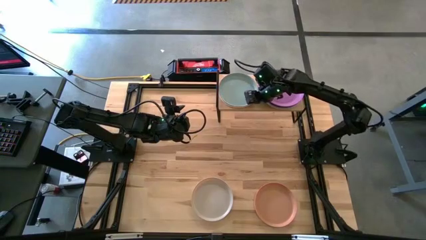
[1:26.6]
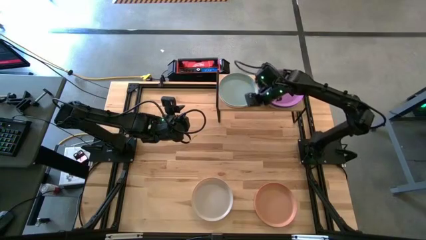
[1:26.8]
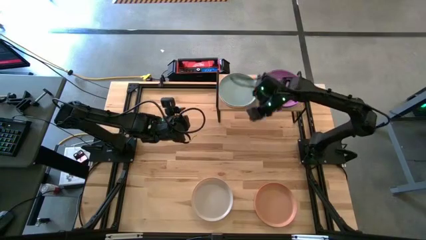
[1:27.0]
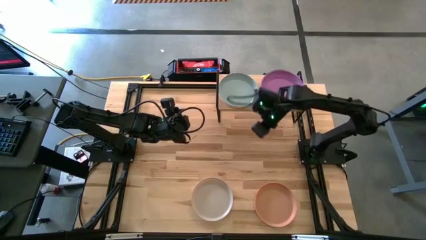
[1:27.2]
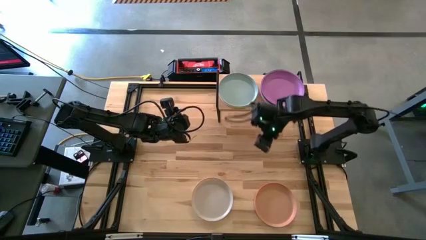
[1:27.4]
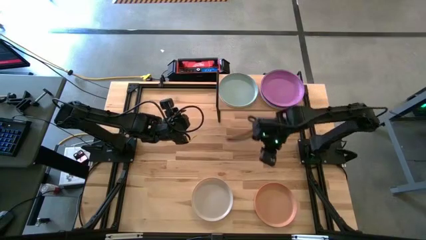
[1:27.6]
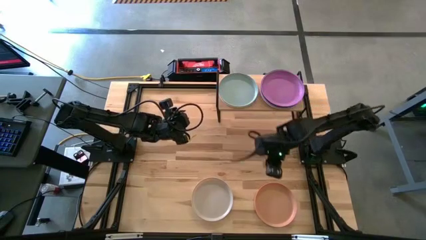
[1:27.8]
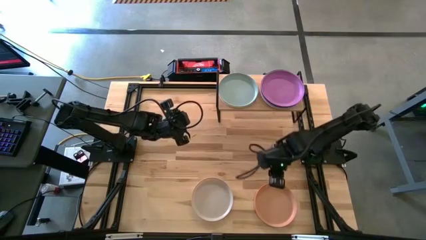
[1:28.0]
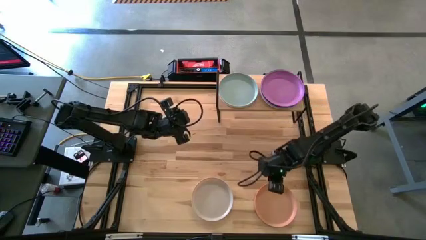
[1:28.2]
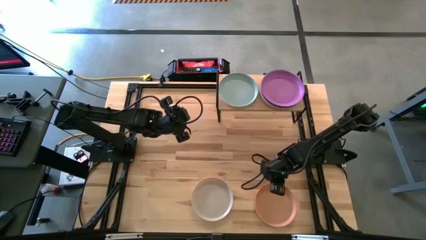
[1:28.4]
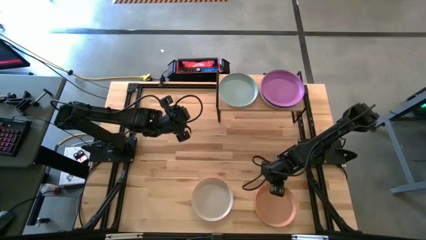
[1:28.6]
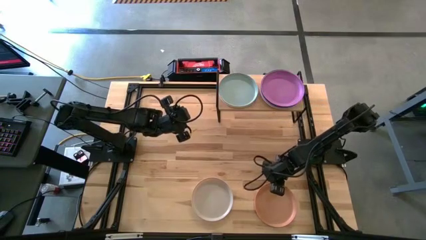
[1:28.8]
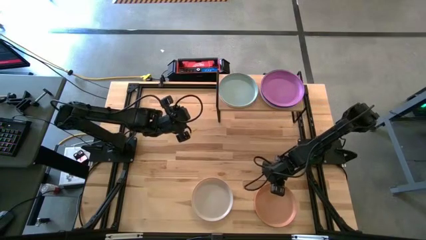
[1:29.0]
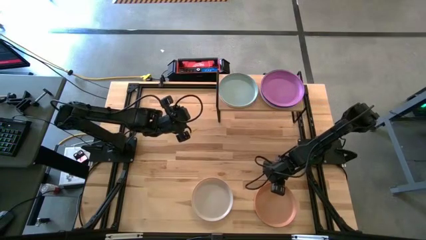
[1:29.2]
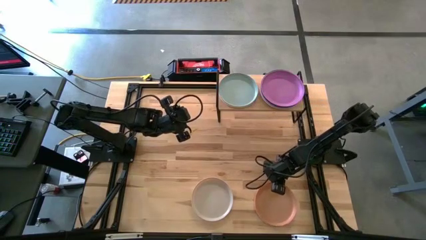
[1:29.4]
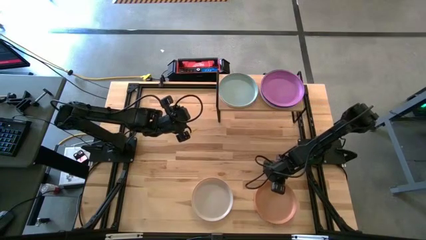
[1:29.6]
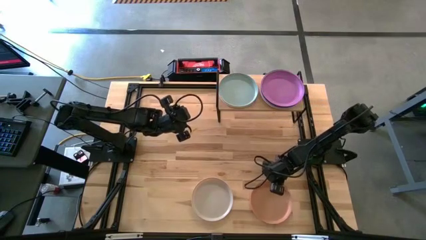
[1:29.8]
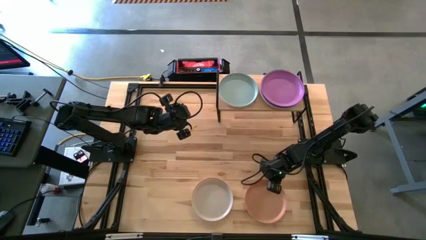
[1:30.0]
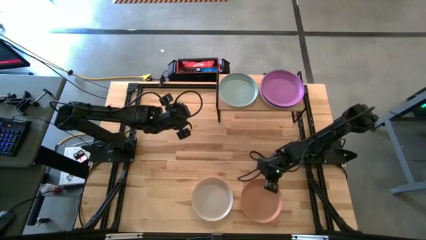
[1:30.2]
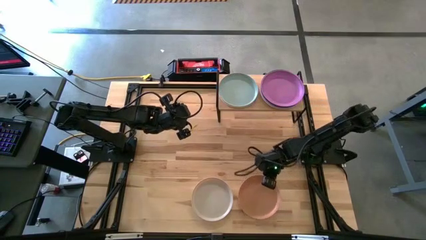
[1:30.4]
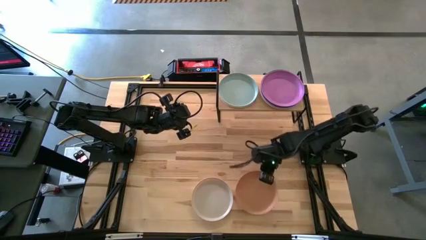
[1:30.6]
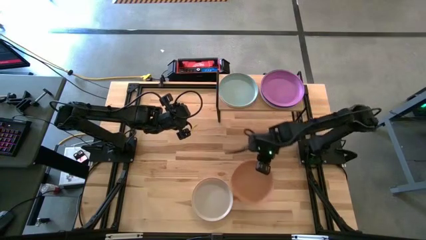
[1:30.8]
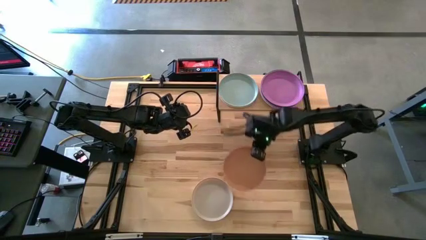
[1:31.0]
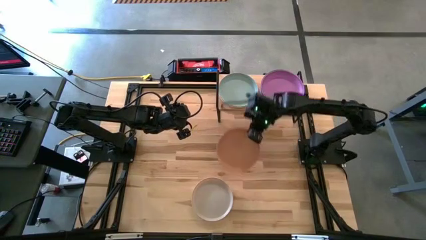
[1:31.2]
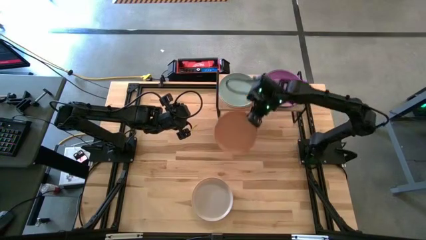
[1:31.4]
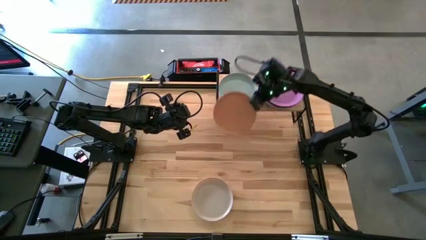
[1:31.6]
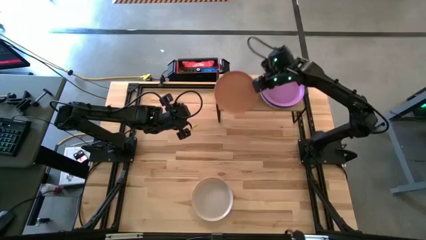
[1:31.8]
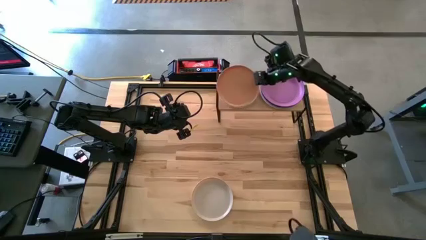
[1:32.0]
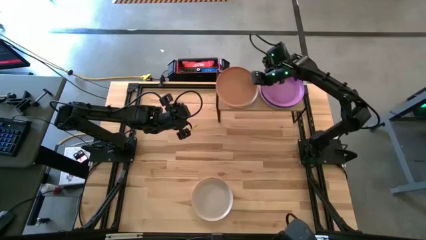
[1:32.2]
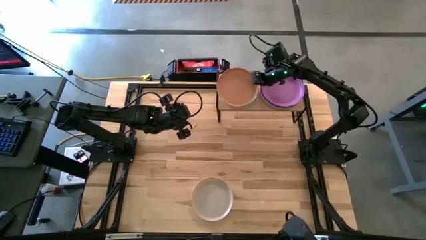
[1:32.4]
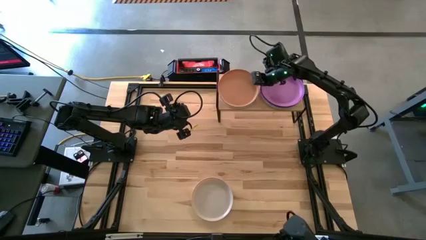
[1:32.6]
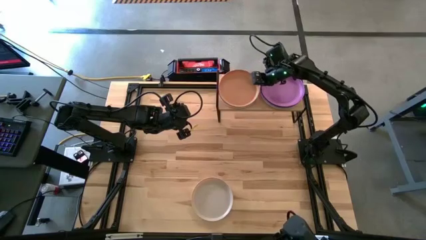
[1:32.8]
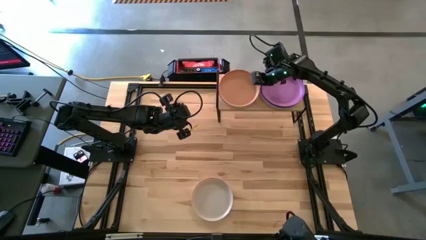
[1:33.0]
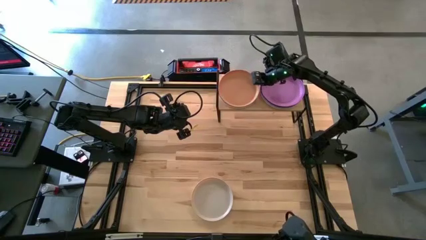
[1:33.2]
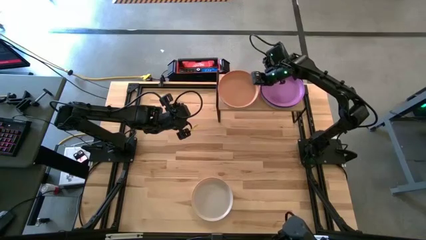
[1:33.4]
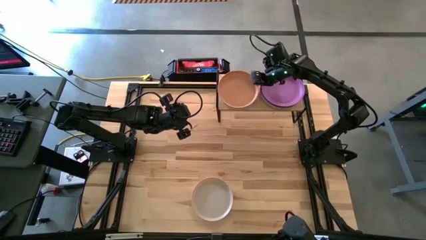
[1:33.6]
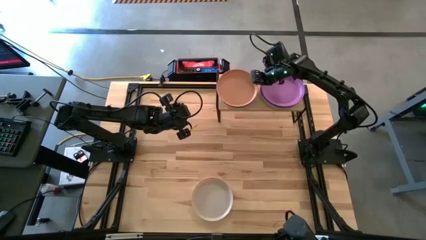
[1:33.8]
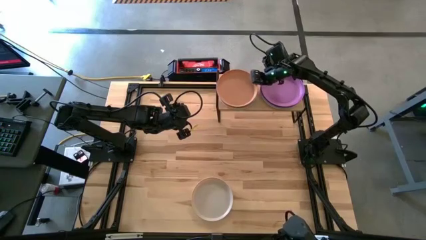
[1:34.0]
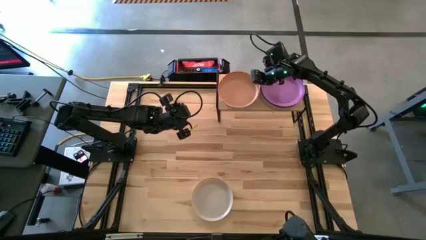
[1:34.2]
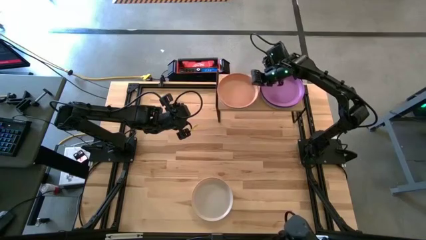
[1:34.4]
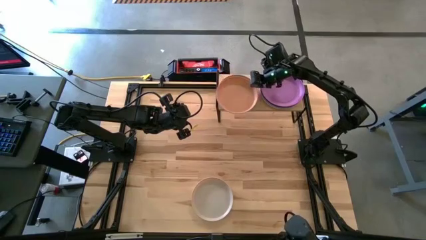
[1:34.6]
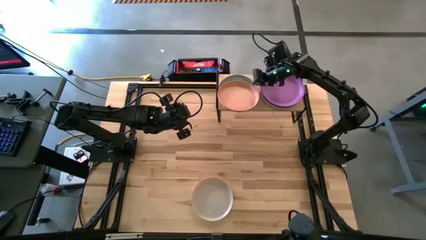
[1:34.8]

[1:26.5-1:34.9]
Task: Place and stack plates onto a shelf
Stack the brown plate on top of the light blue plate on the shelf

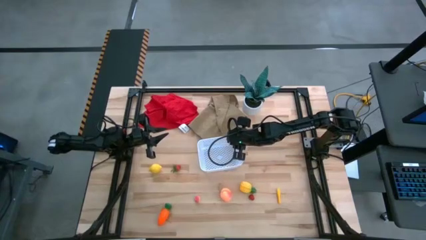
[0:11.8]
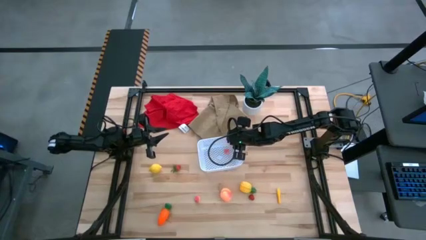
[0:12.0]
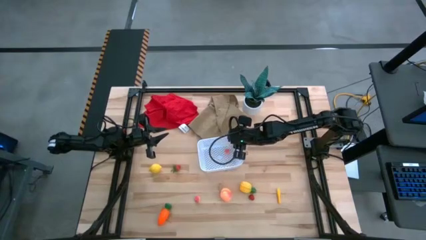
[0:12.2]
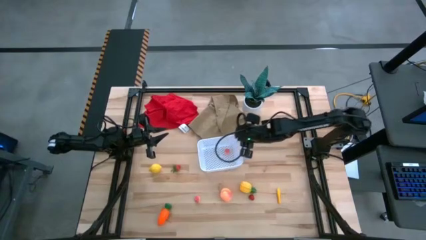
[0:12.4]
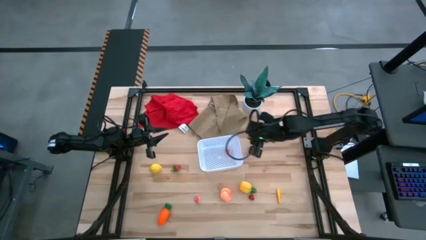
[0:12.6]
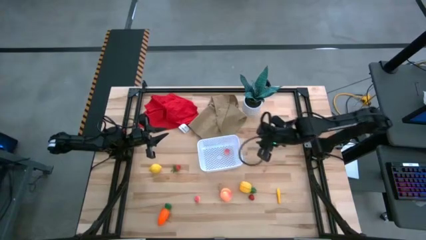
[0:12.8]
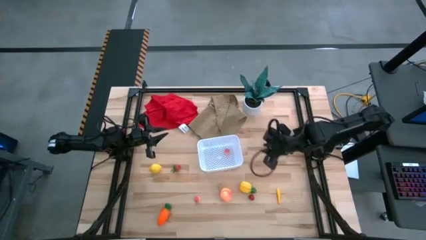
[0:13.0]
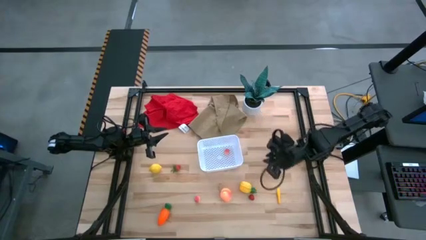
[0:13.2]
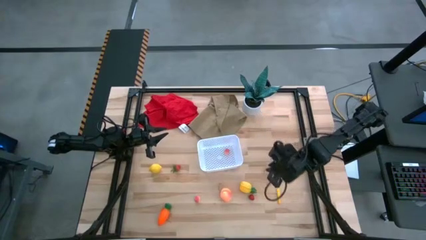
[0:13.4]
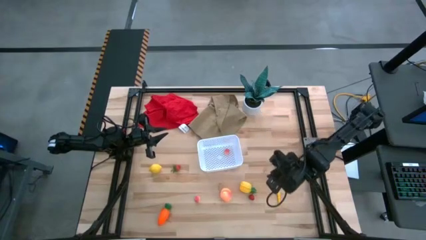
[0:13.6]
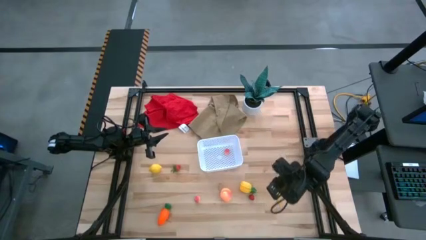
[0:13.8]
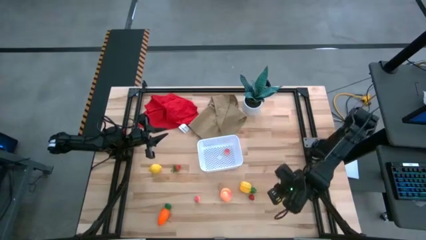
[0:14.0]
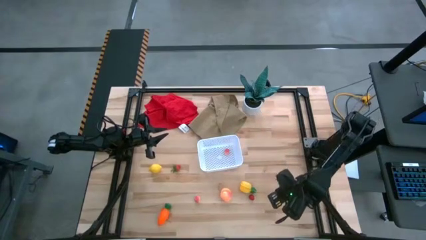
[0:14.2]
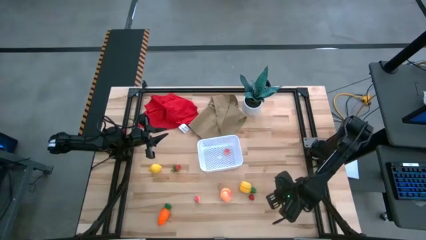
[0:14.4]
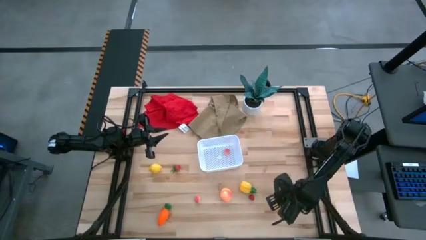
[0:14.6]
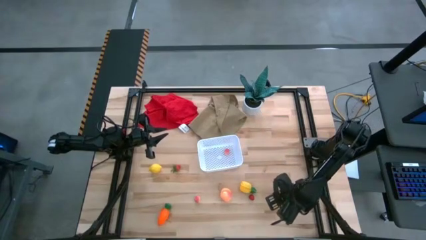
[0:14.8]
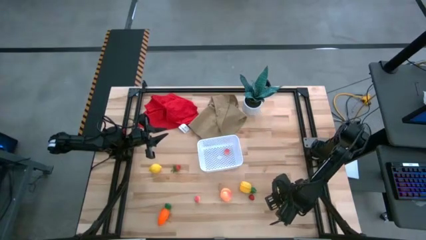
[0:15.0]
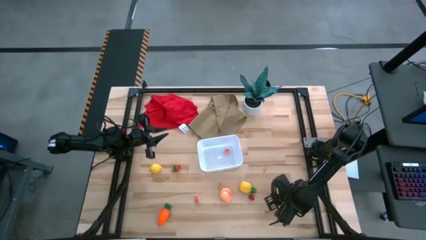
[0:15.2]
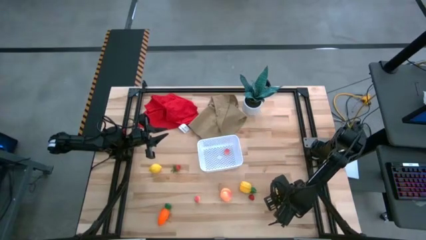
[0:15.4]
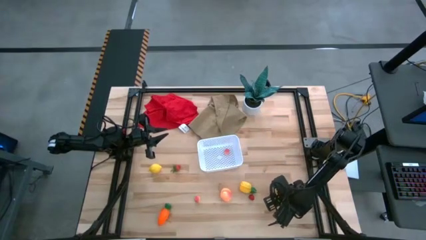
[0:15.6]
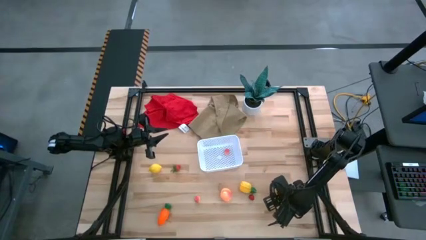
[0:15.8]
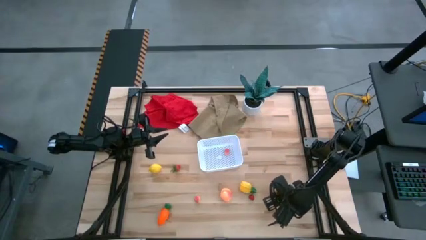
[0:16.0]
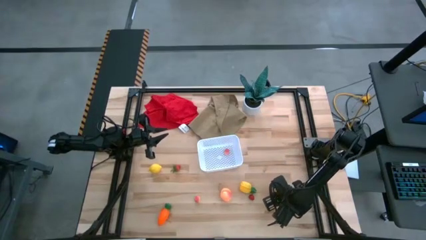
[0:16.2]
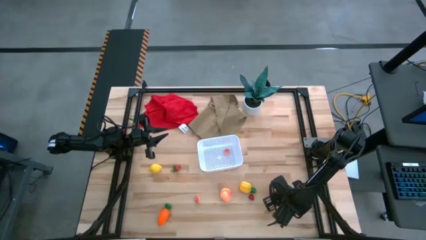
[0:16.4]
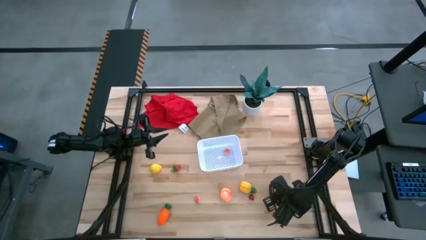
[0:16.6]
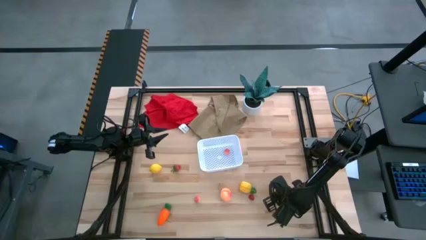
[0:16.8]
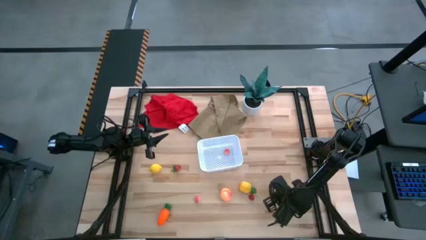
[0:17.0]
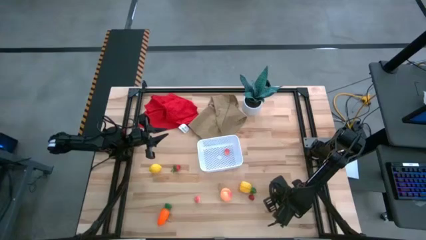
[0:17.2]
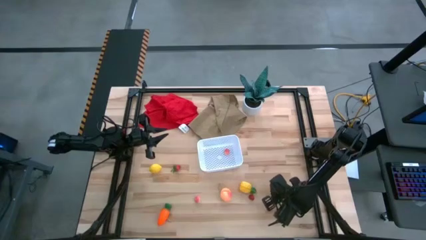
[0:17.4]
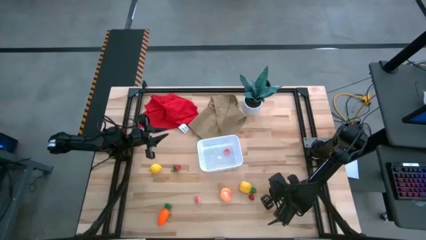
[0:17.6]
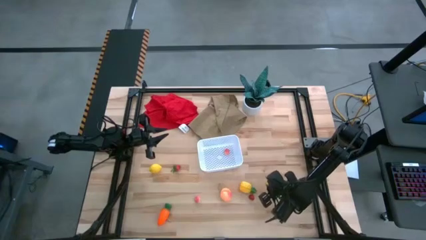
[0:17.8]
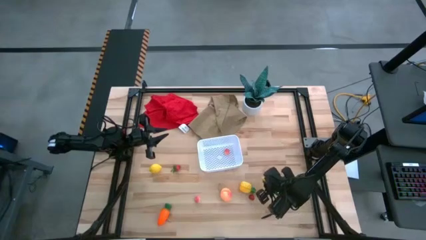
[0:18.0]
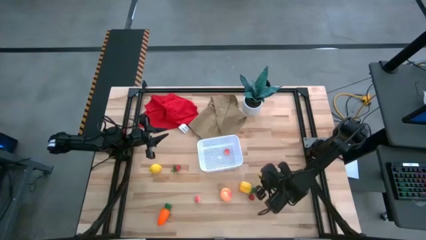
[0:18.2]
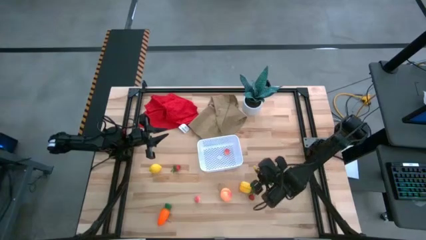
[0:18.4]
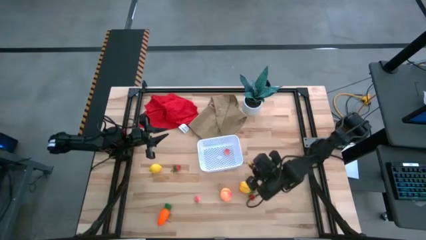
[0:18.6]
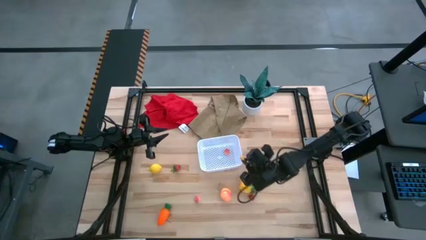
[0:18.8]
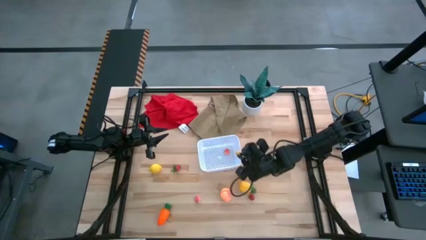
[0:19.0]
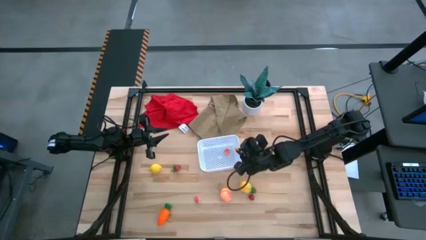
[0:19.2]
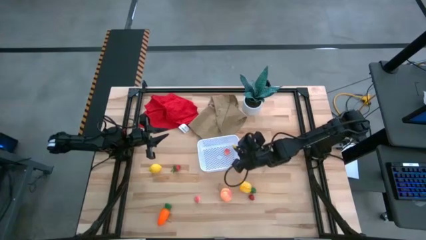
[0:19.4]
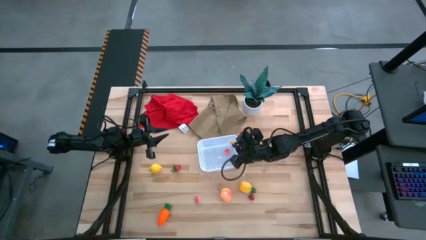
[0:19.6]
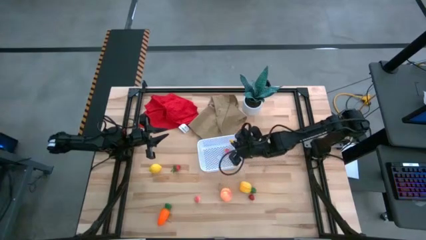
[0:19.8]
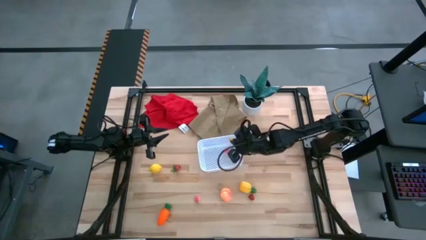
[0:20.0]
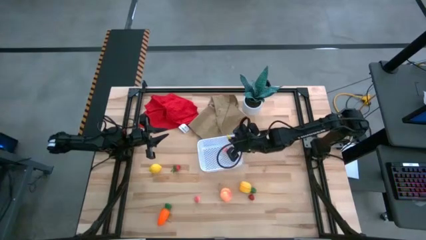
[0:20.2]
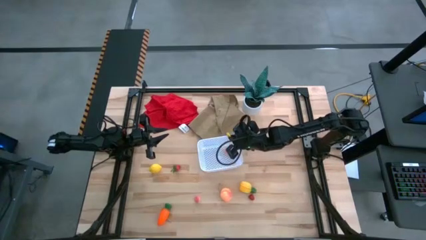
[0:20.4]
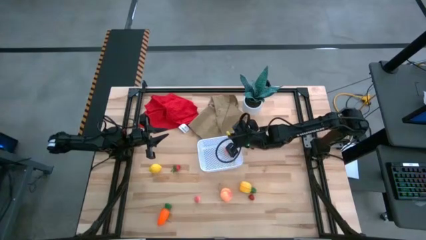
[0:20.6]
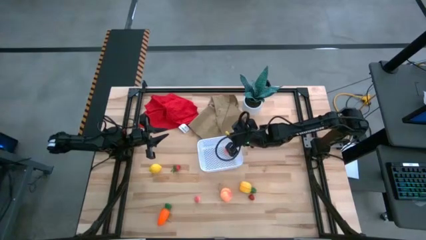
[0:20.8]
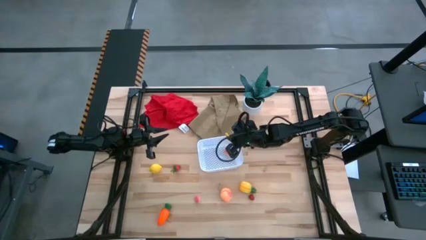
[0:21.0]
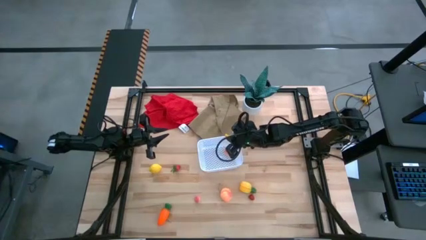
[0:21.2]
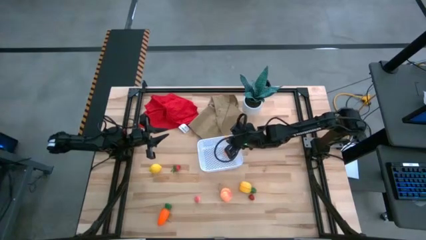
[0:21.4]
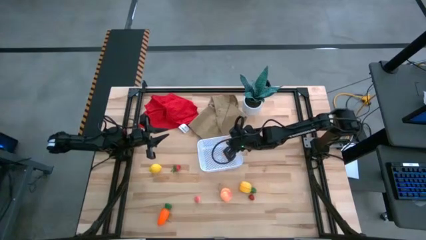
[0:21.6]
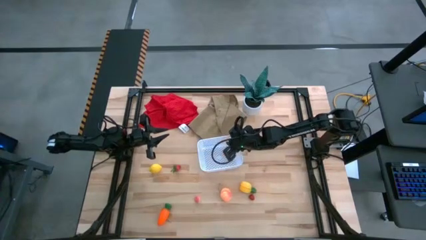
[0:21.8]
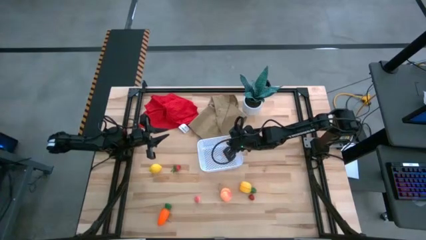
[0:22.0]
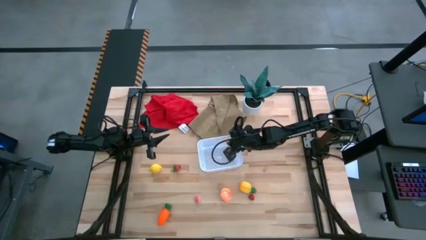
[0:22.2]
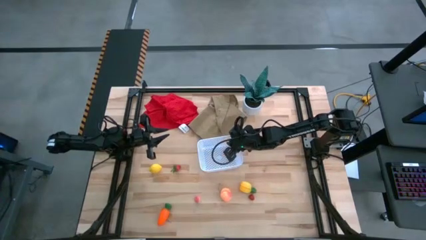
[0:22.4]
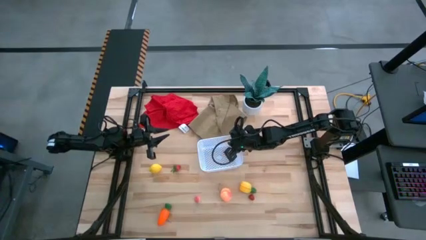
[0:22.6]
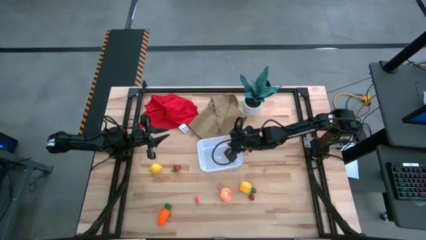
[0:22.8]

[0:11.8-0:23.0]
Task: Pick and placing Produce into tupperware
Put the corn into the white bin
